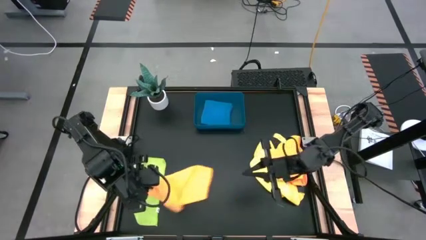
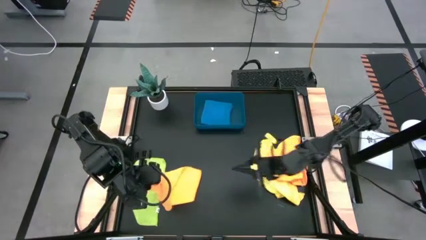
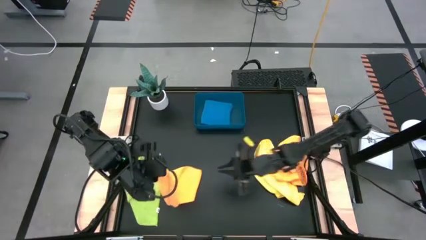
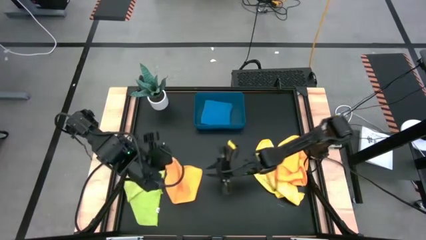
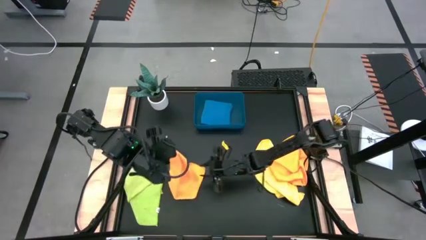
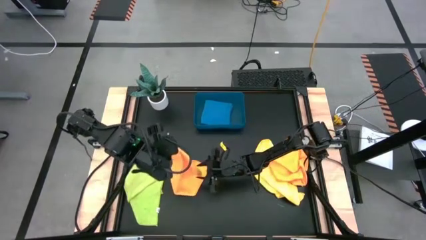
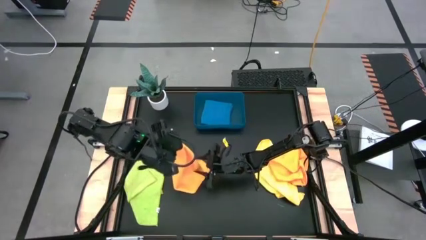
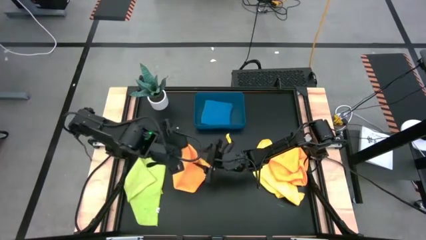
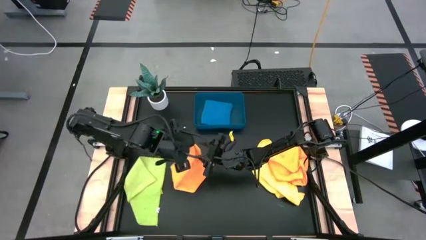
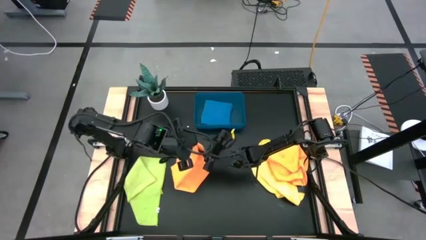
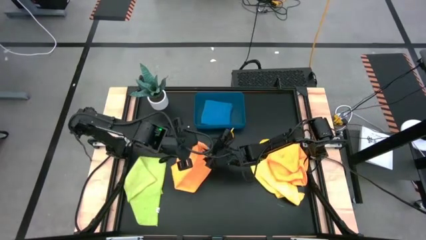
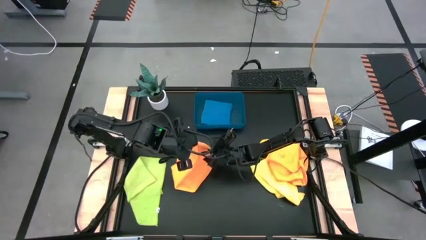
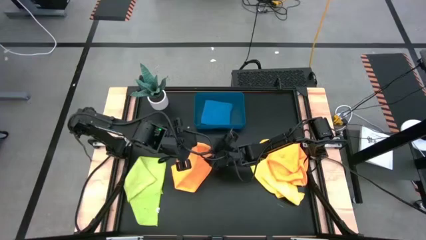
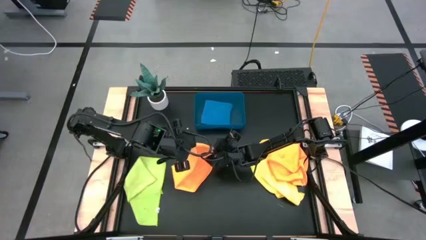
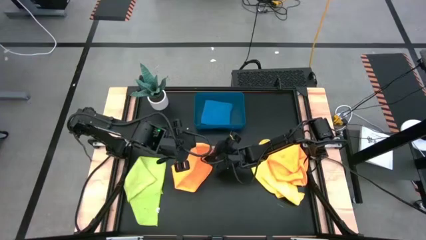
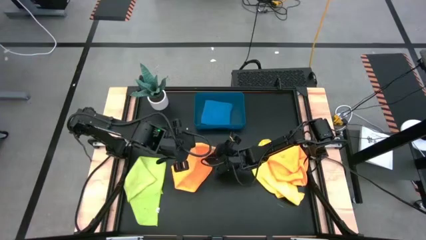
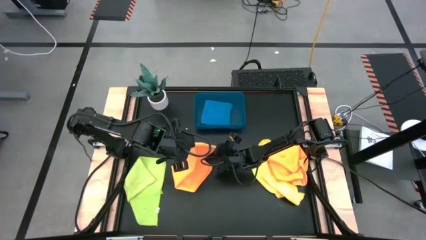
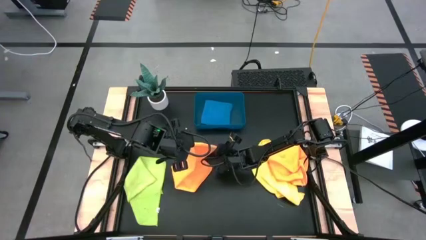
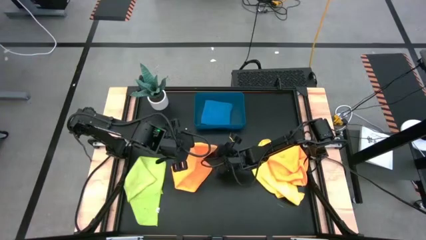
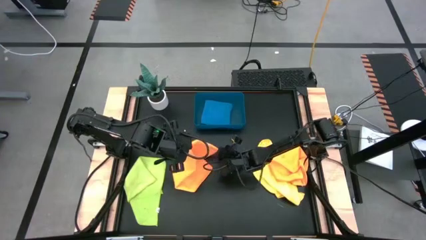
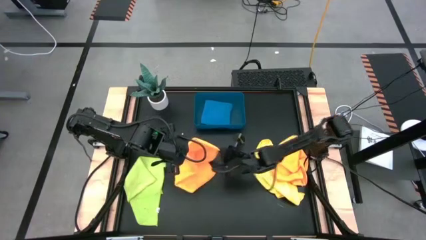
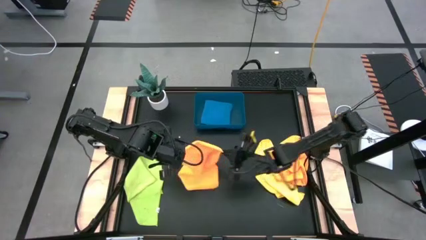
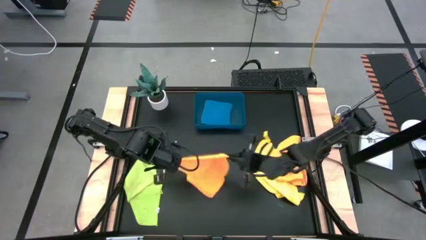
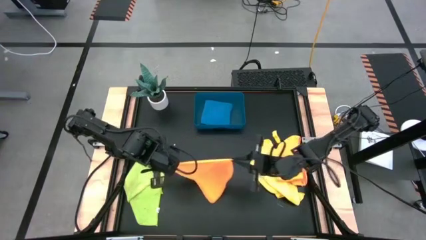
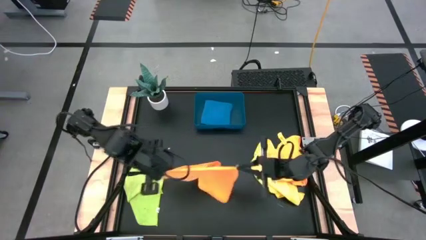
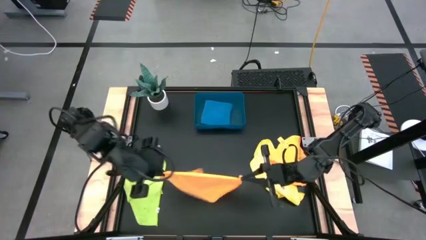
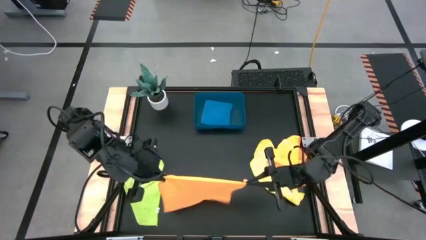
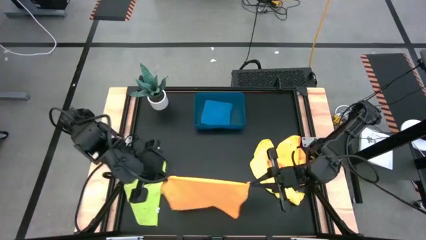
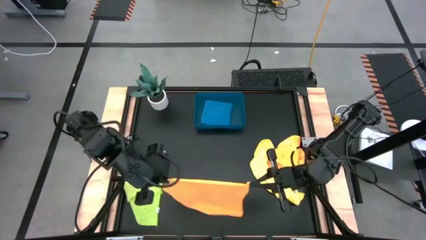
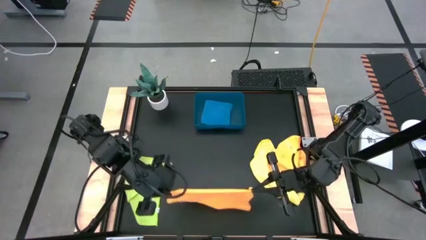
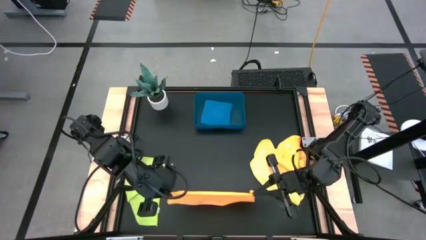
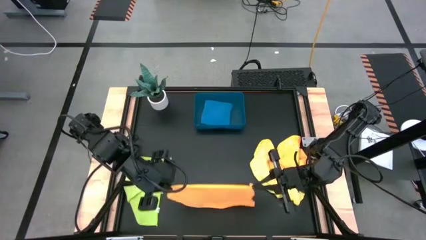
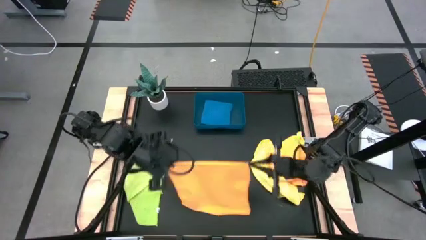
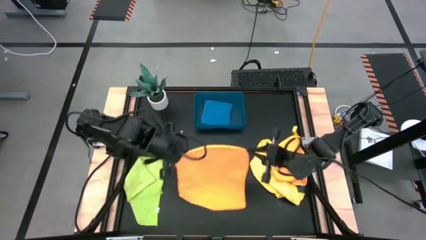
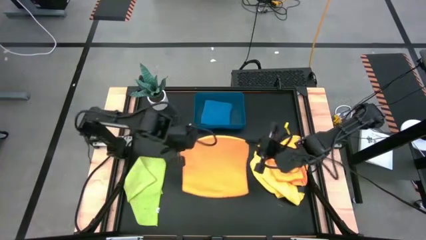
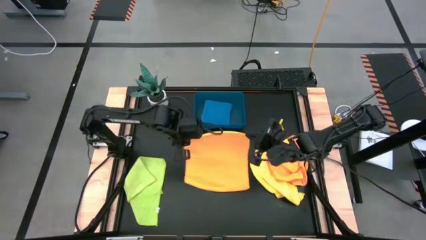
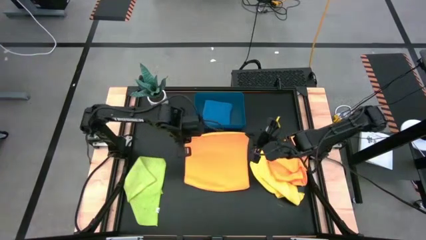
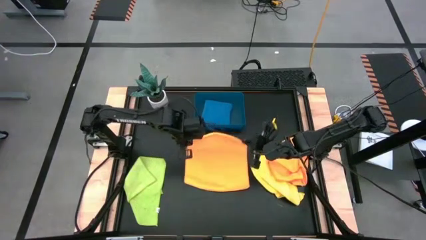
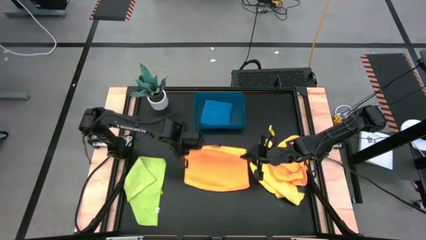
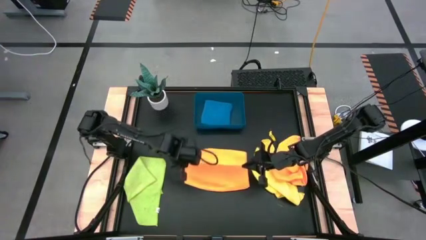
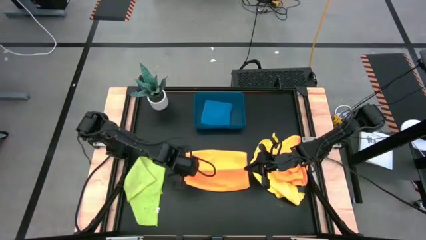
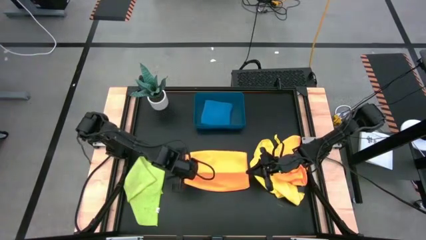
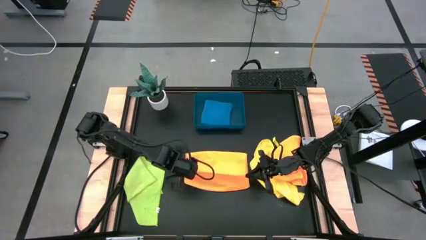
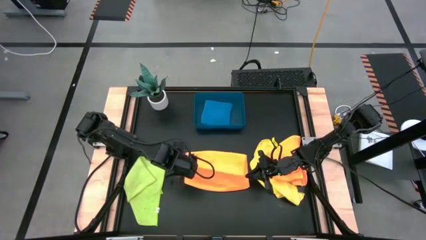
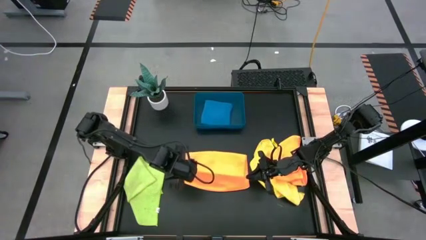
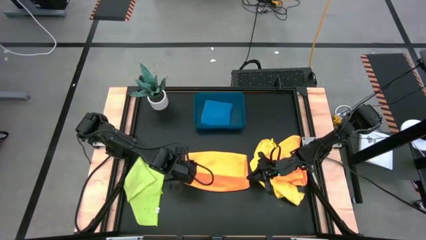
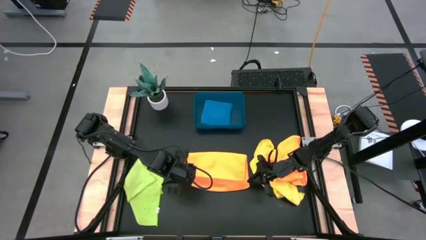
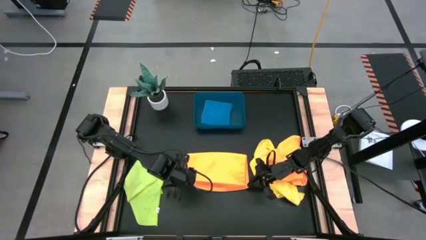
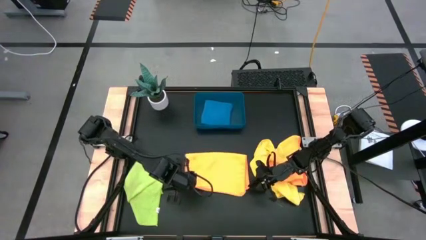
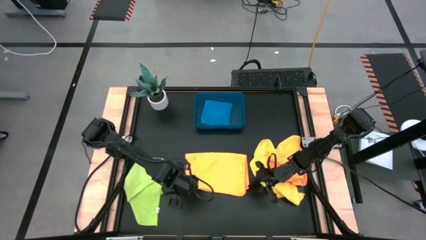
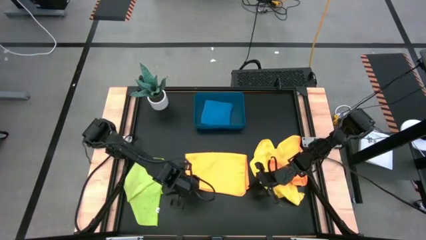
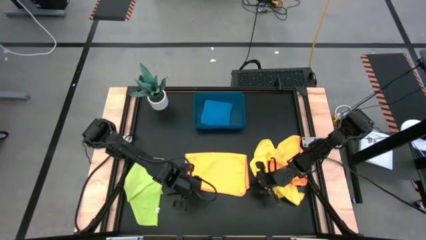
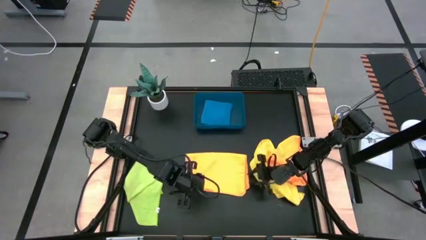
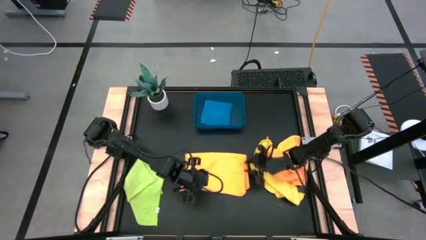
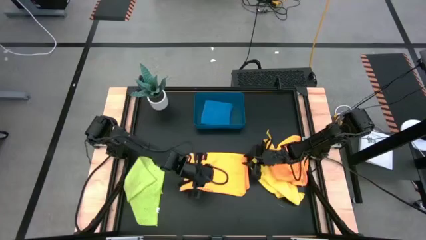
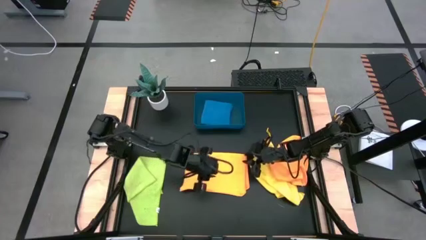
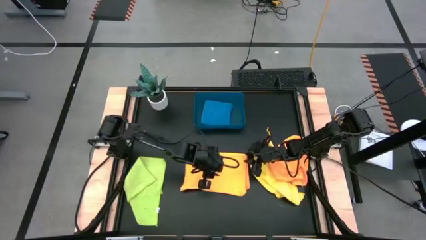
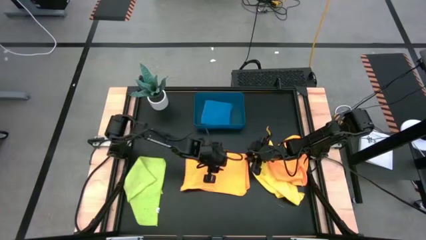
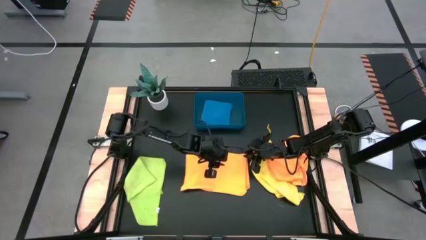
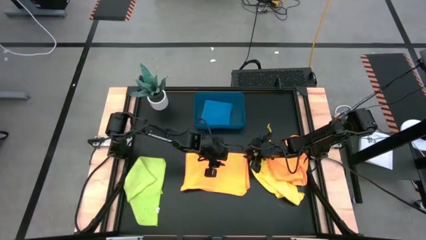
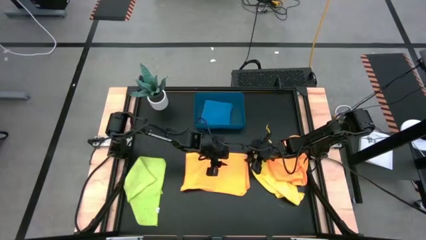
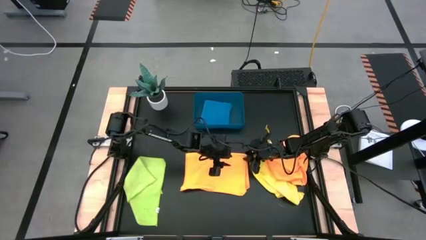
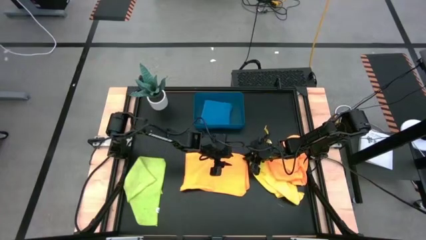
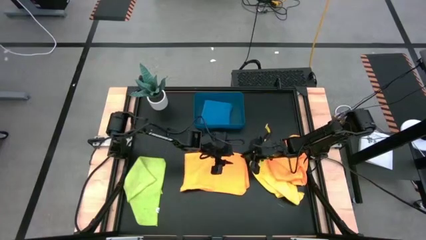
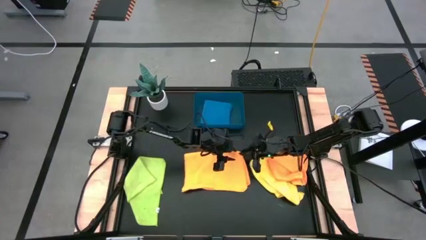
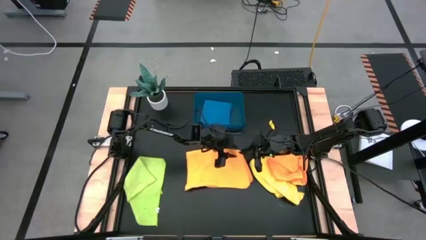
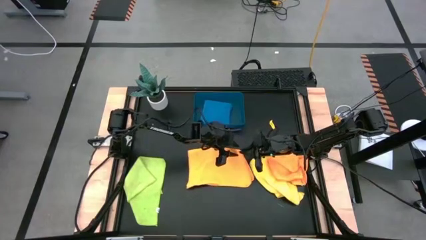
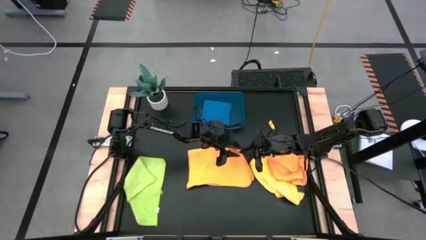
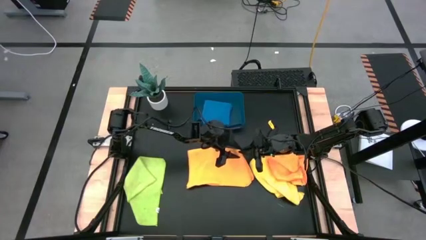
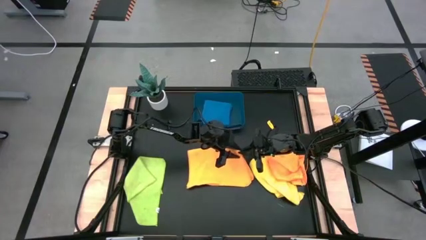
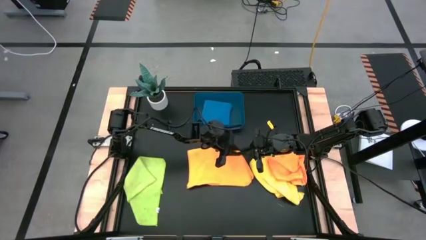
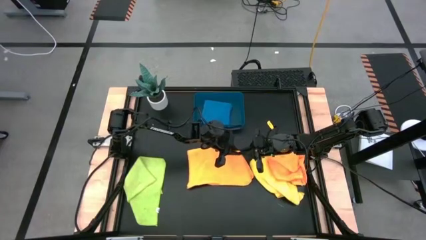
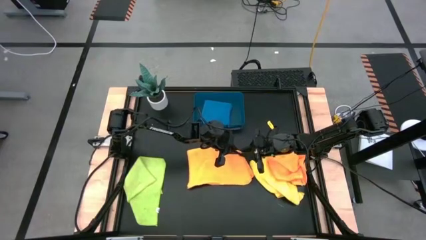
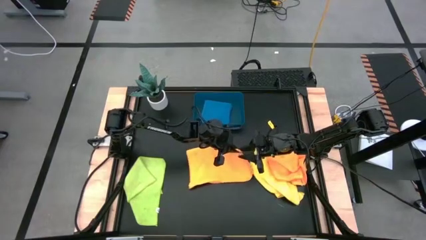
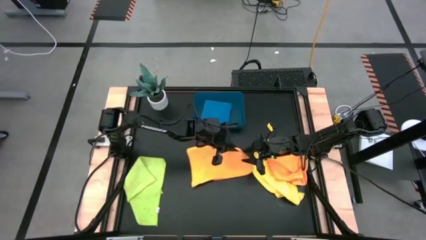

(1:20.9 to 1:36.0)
Task: Fold microfiber towels
Fold the left orange microfiber cloth
